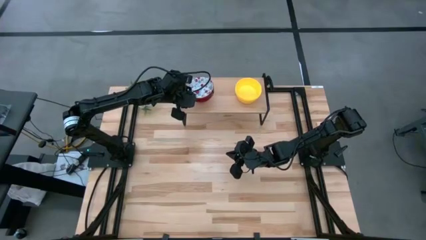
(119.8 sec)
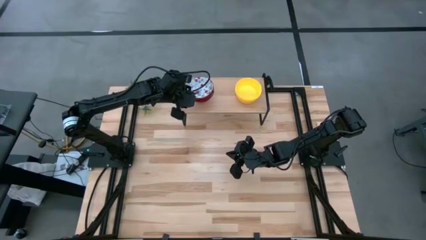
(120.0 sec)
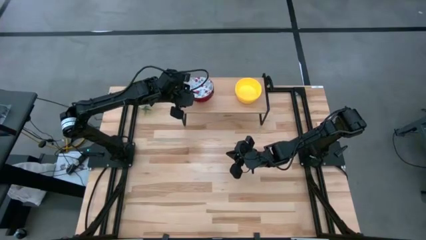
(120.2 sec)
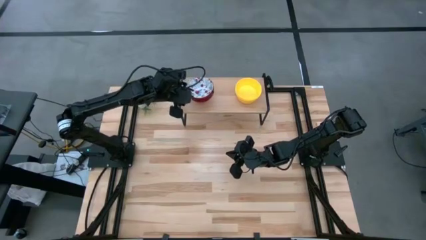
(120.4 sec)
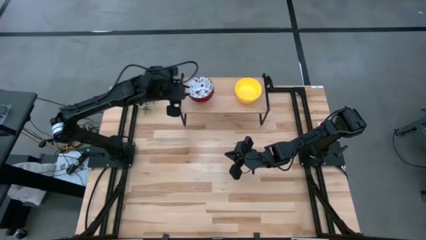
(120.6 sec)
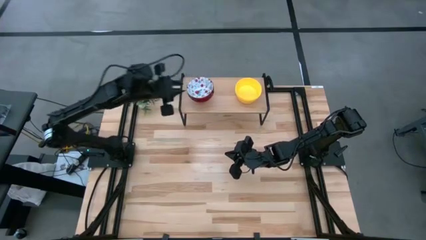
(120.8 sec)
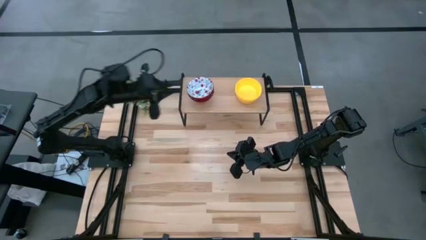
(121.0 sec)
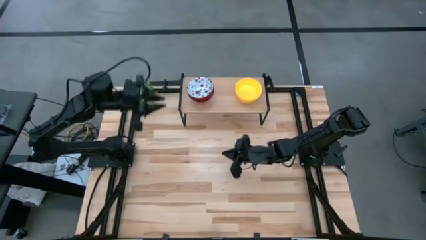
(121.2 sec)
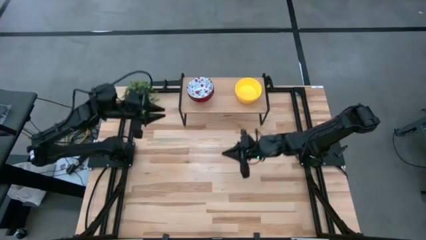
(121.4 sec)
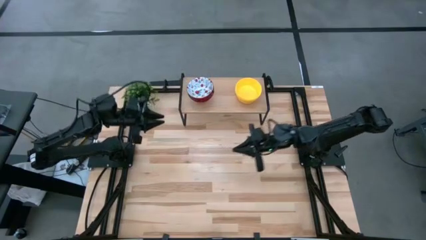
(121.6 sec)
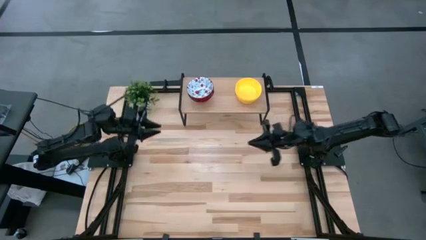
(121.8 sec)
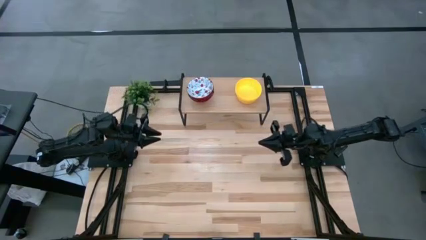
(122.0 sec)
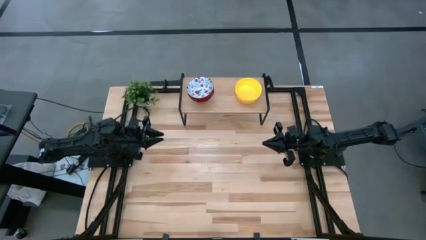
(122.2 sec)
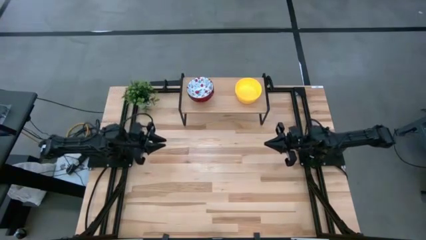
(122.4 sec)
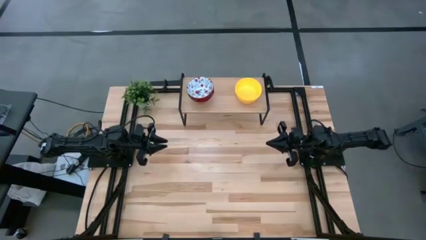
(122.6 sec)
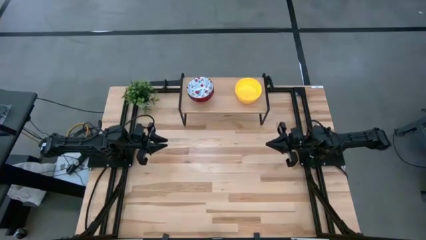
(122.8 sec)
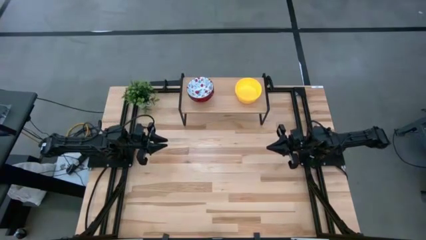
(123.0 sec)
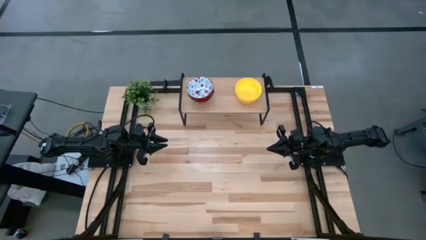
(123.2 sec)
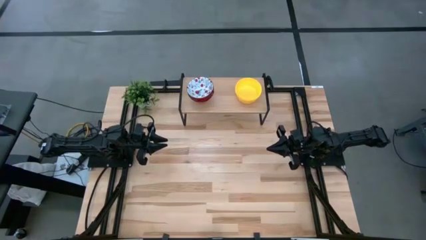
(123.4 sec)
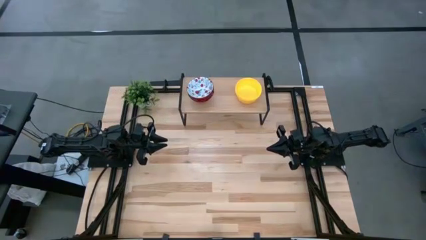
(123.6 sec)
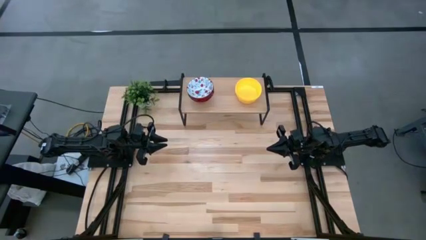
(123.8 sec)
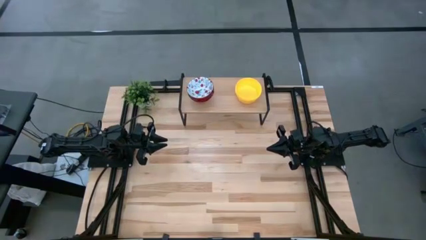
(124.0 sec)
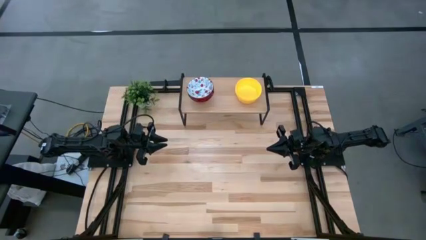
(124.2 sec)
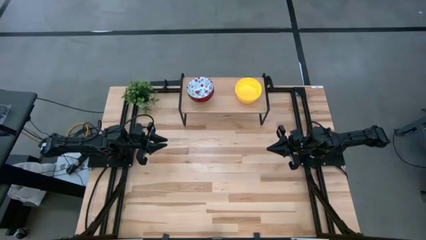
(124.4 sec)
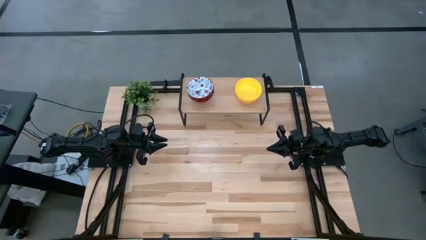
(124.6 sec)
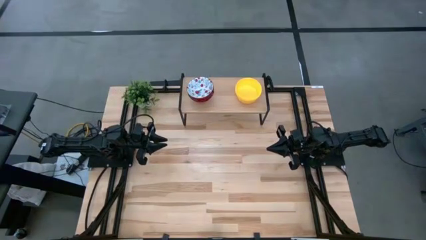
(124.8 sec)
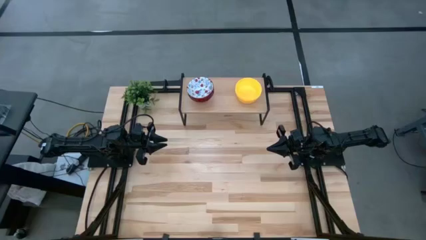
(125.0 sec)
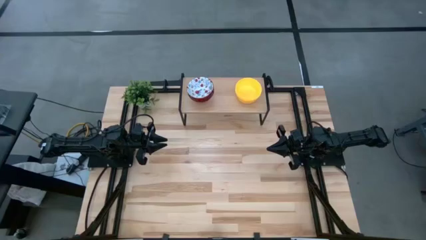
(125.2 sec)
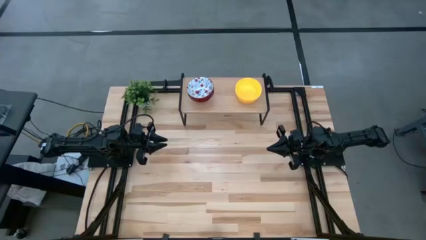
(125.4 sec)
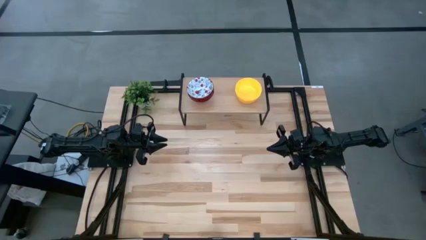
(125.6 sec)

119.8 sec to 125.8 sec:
Task: Pick & Place Mini bowls
Return to Home Position
